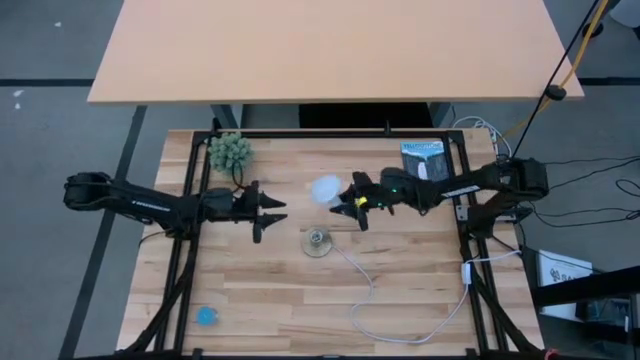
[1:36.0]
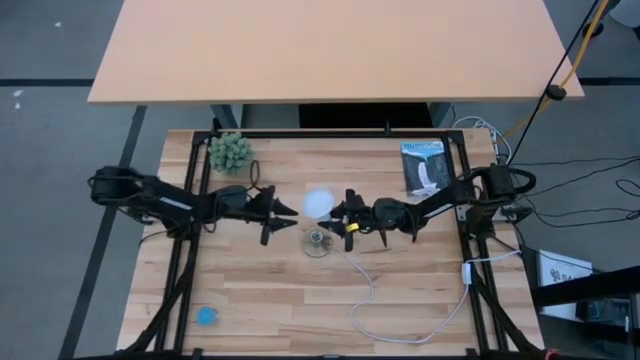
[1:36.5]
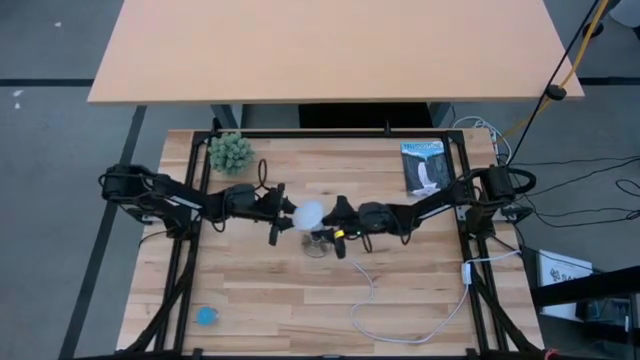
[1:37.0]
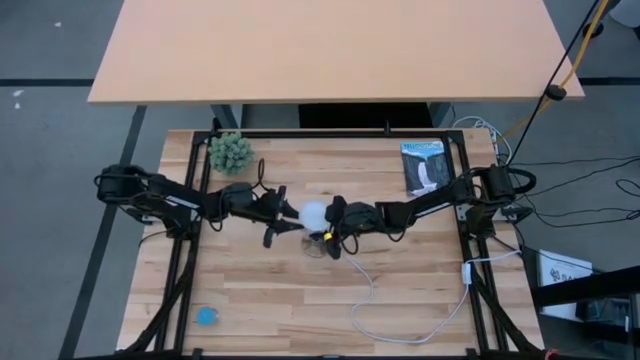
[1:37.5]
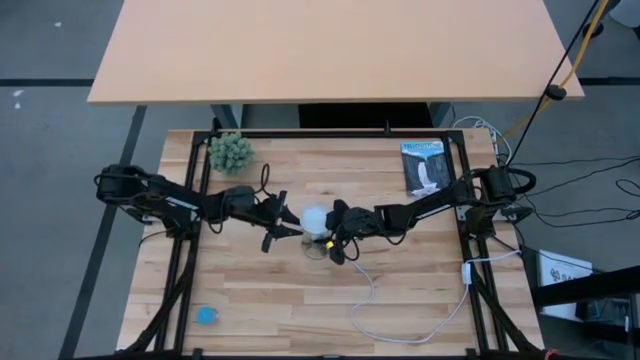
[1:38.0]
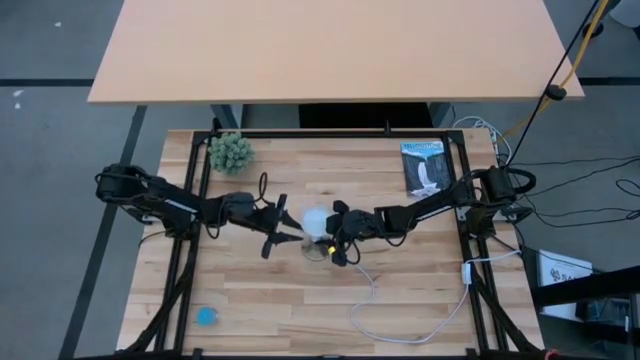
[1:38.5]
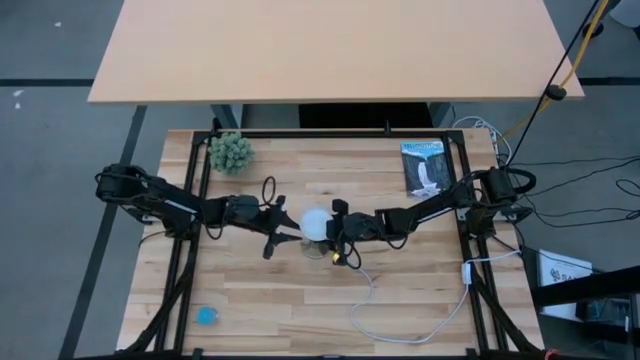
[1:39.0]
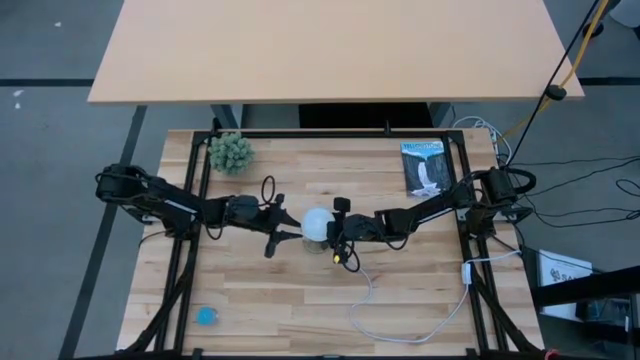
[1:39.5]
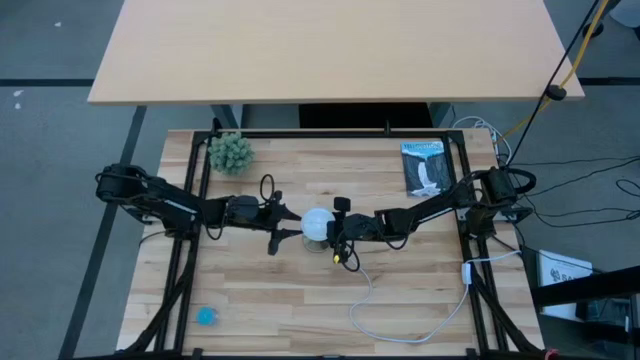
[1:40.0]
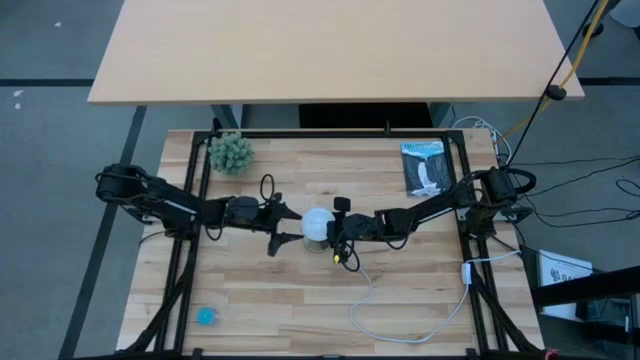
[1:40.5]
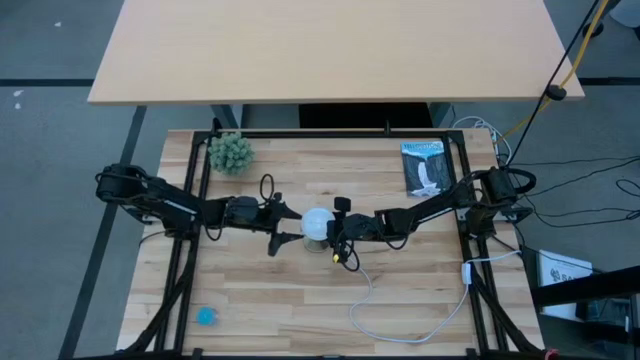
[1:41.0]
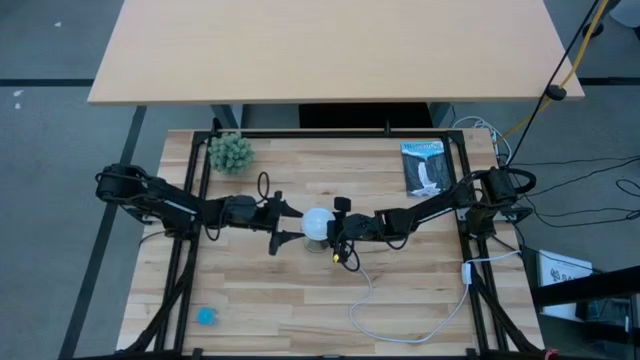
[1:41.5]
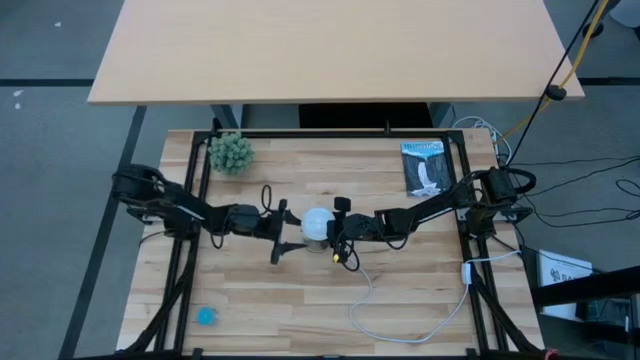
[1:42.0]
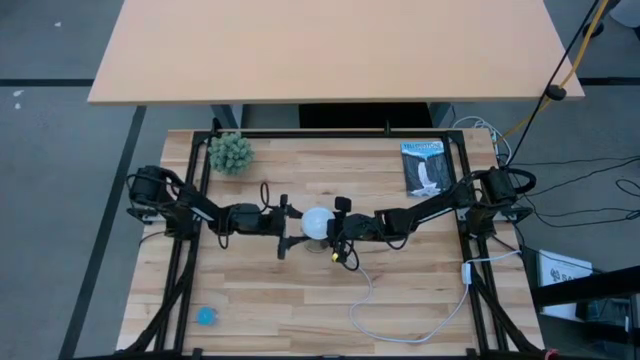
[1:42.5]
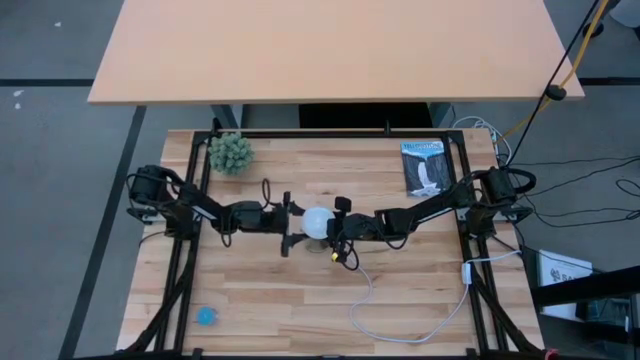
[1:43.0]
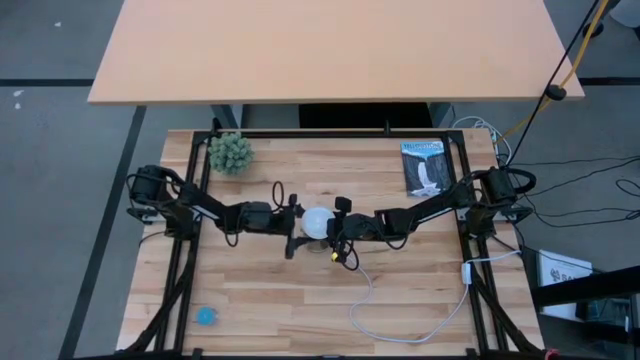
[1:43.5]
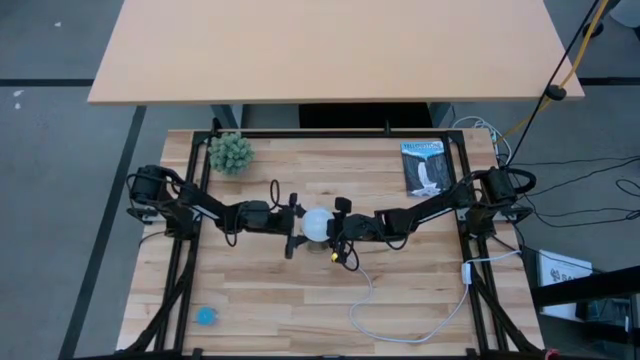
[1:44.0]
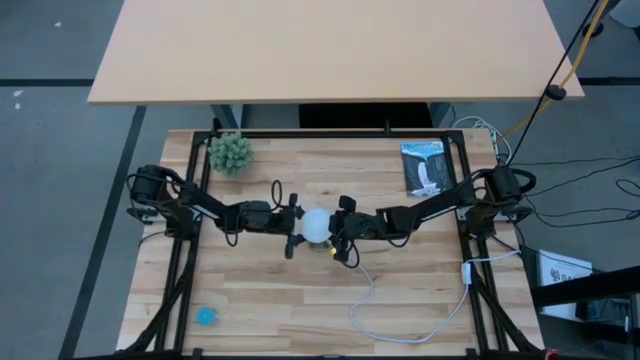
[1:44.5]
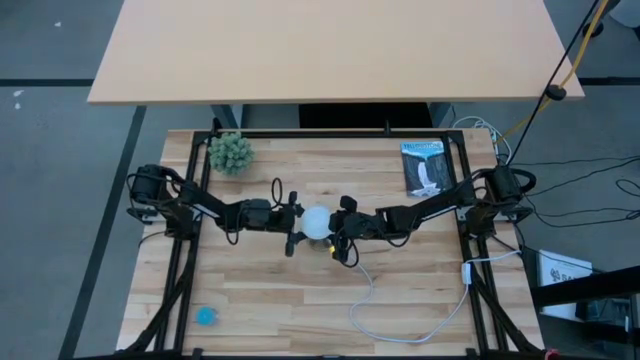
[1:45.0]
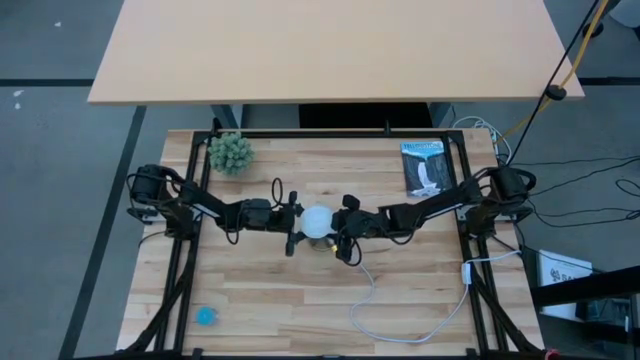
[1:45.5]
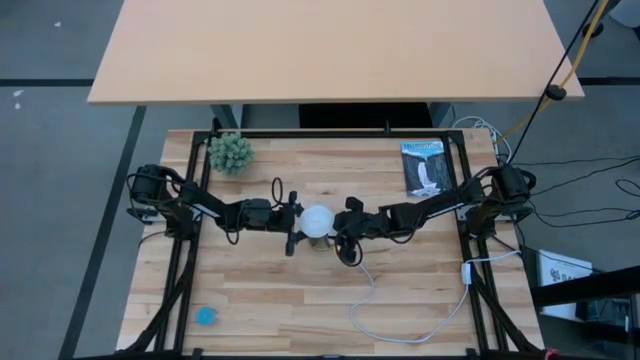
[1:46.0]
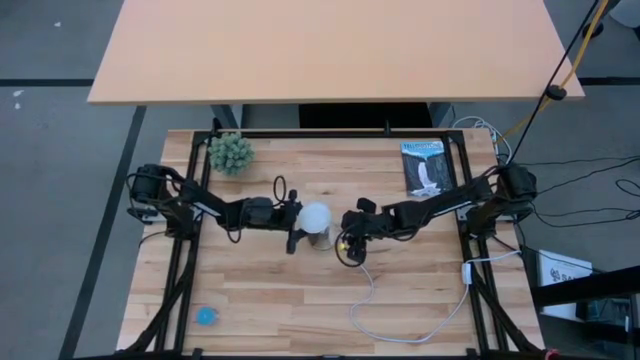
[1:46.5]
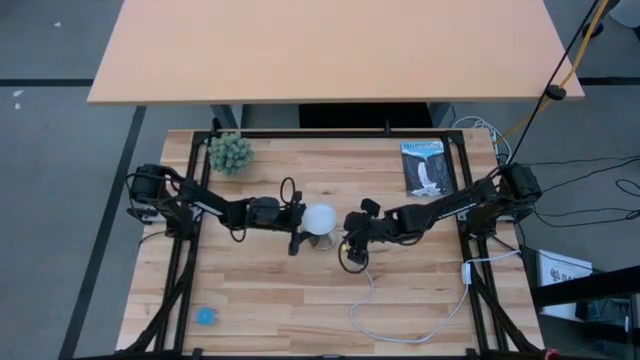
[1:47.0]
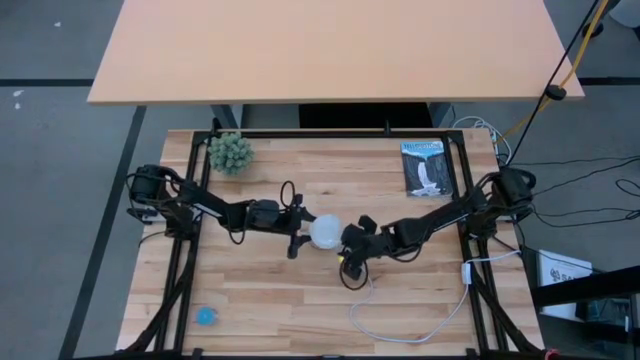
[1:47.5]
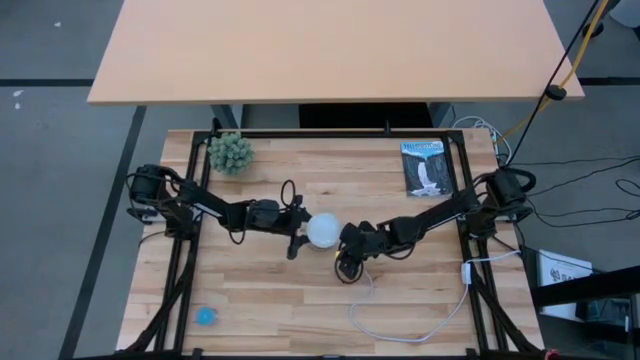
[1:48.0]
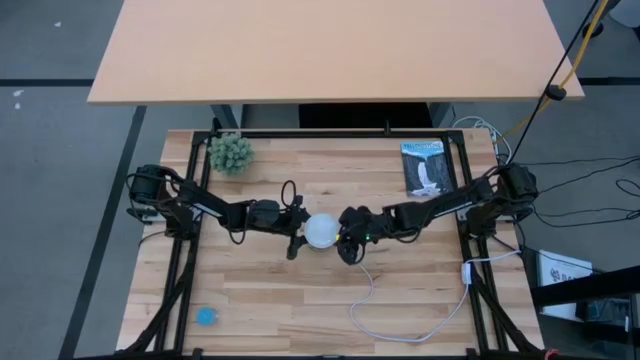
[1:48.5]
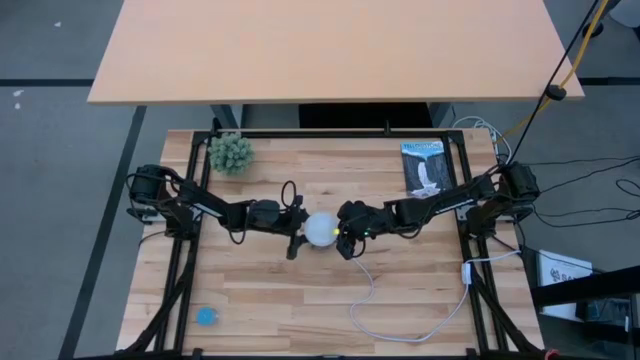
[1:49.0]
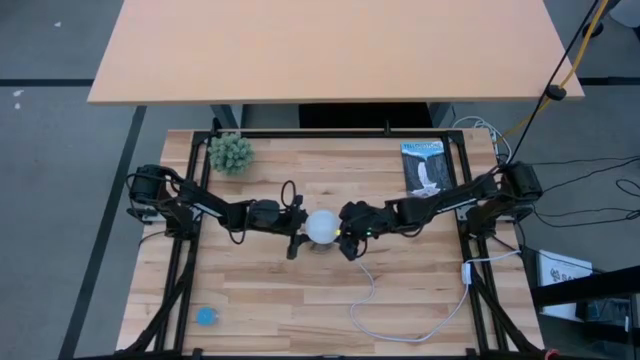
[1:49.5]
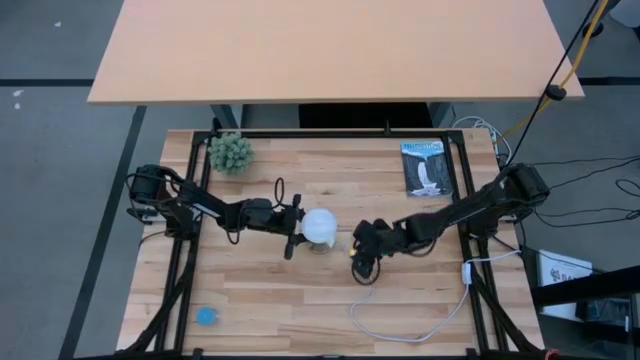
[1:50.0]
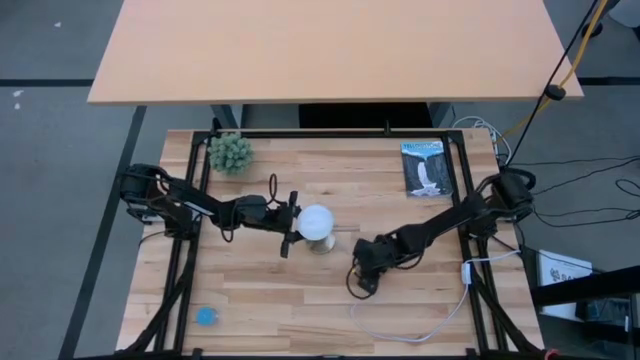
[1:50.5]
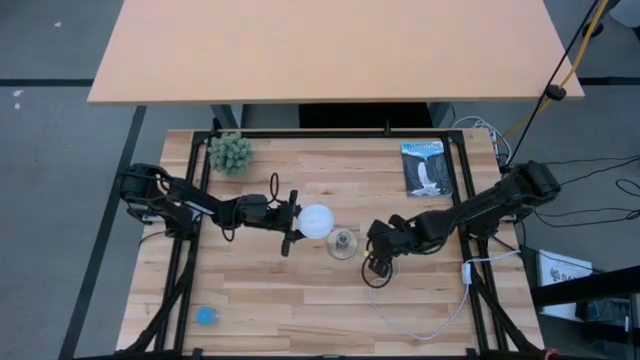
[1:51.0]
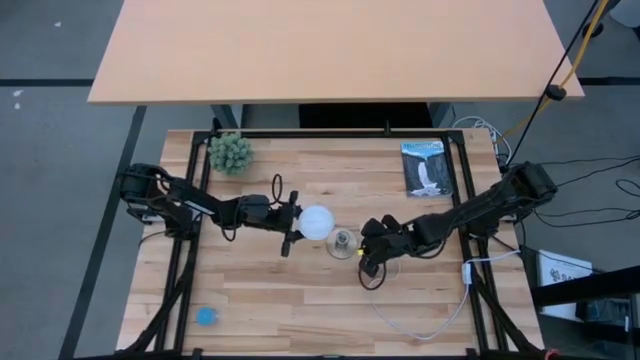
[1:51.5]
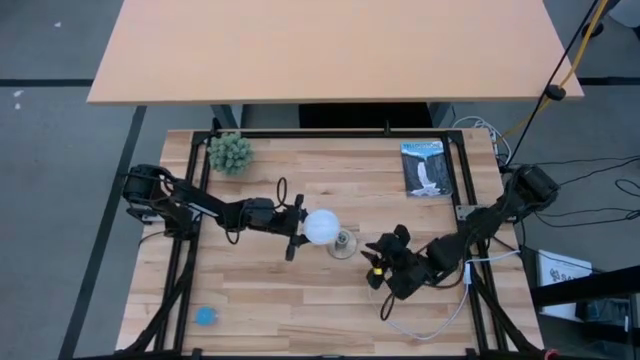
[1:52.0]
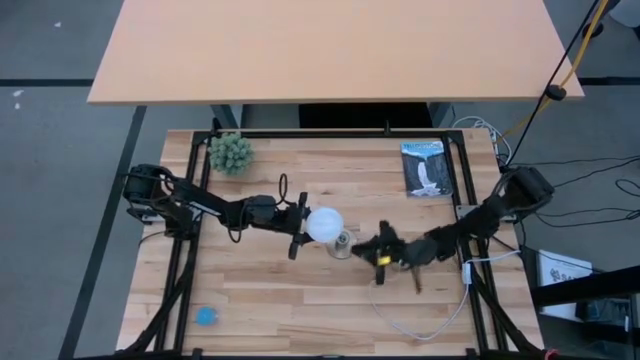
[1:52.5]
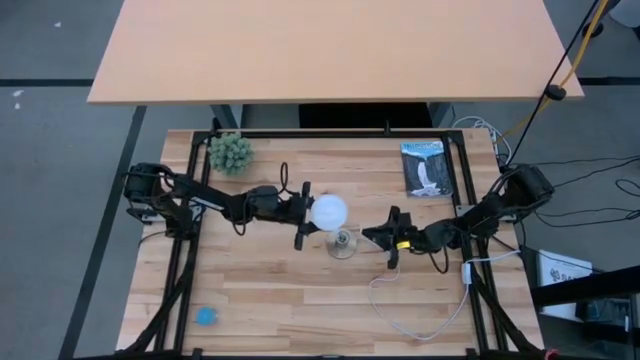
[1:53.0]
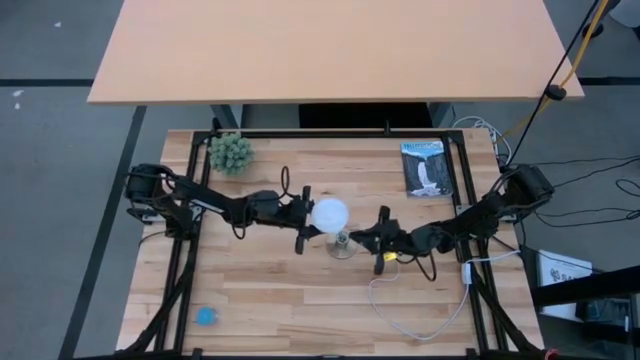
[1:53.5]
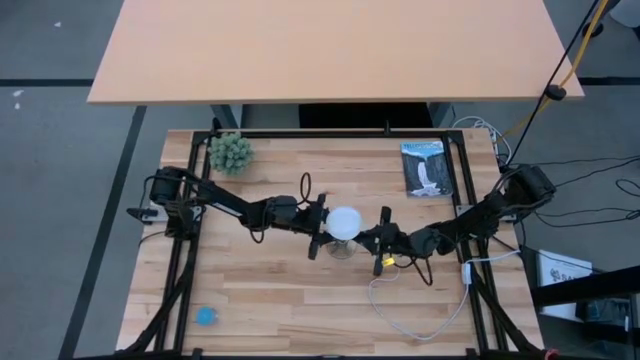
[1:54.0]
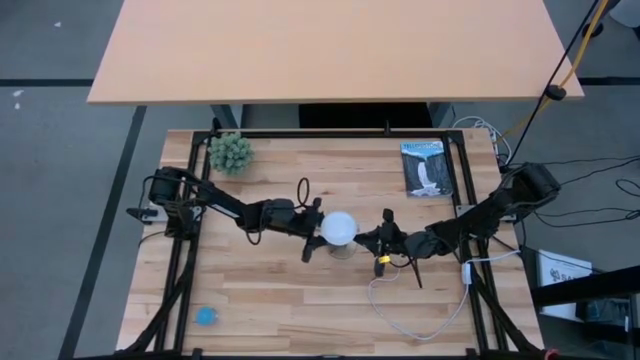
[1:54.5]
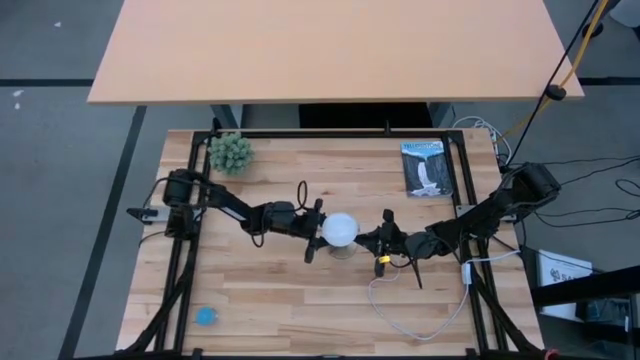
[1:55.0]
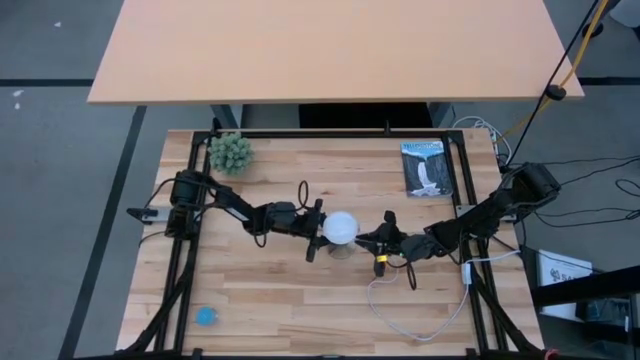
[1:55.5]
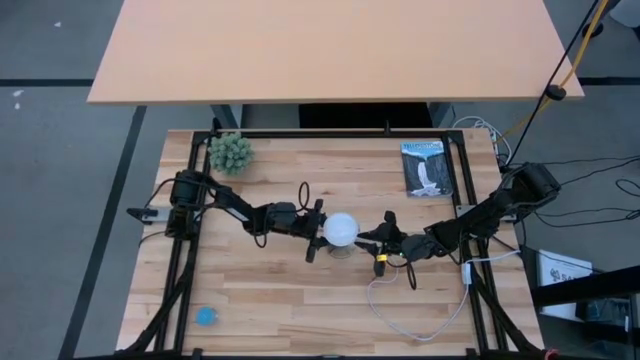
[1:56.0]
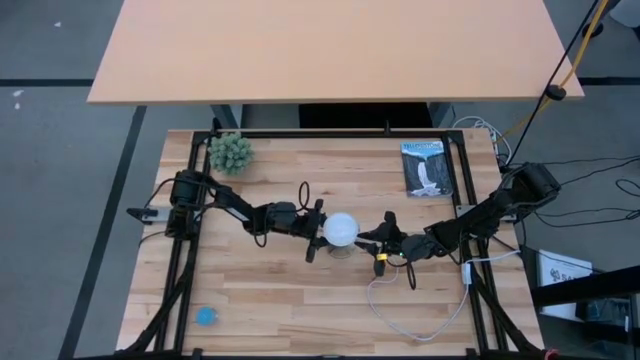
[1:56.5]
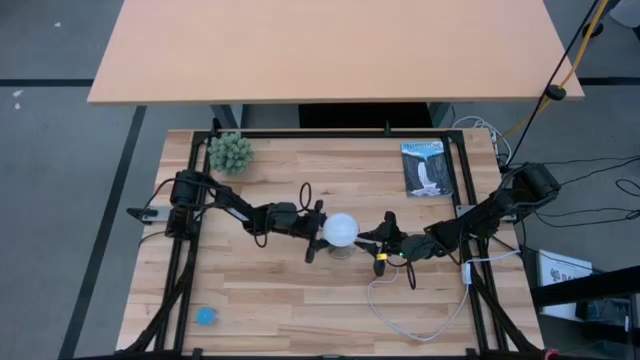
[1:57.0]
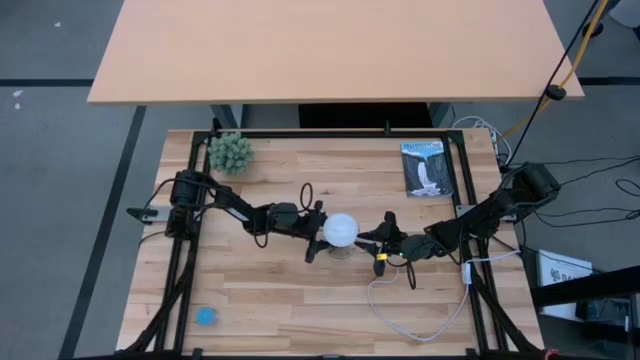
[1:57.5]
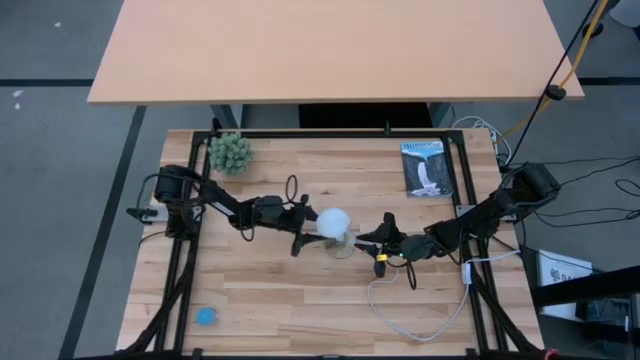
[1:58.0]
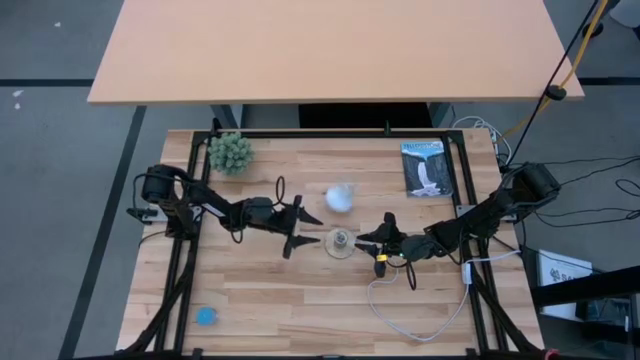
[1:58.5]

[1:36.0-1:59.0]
Task: Screw lightbulb
Insert the white light bulb into the gold lamp
